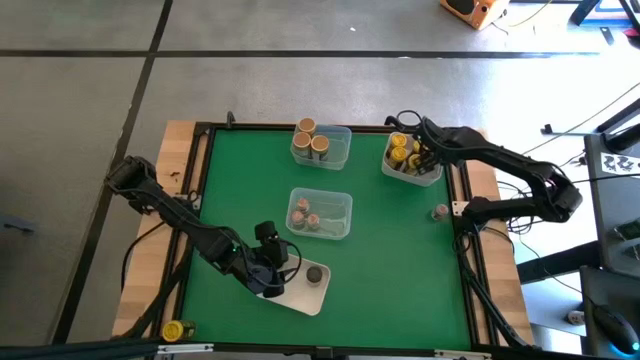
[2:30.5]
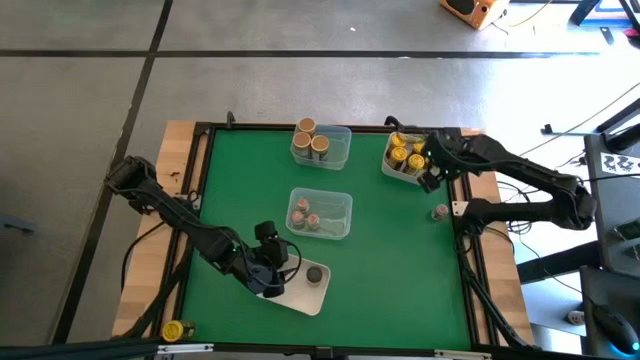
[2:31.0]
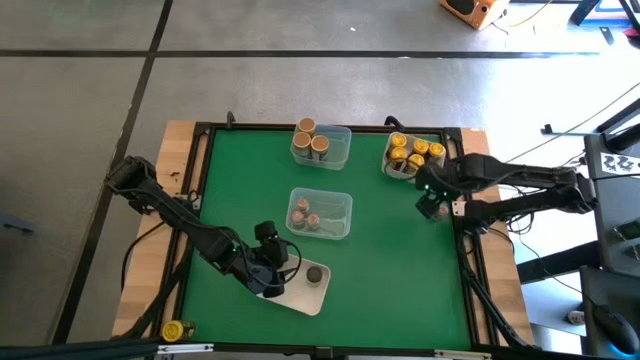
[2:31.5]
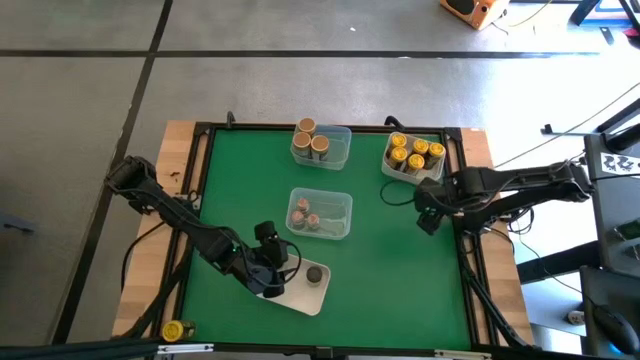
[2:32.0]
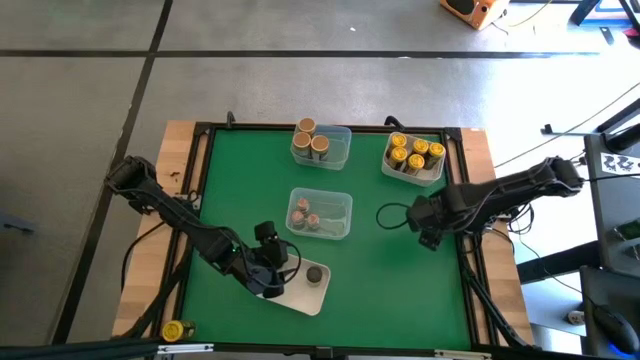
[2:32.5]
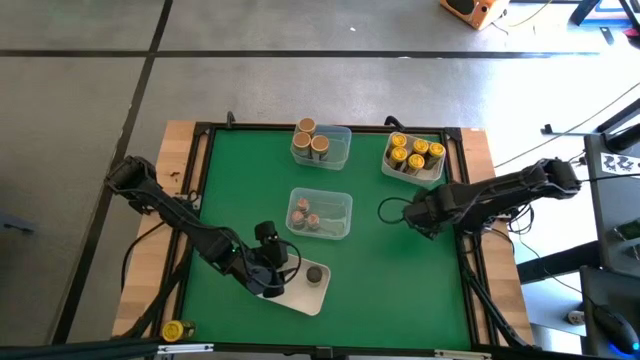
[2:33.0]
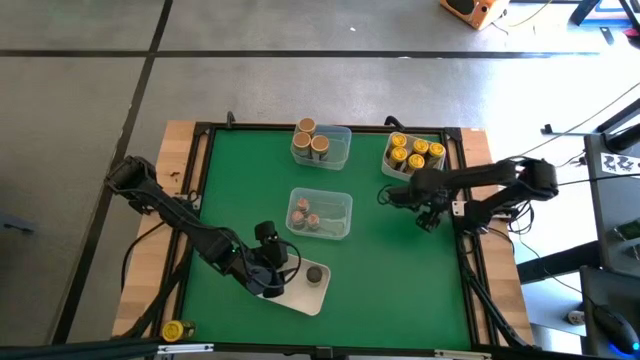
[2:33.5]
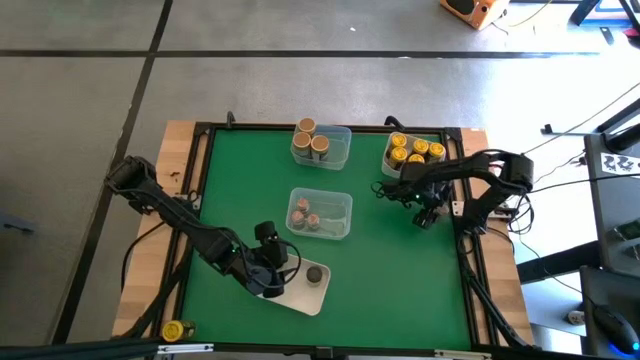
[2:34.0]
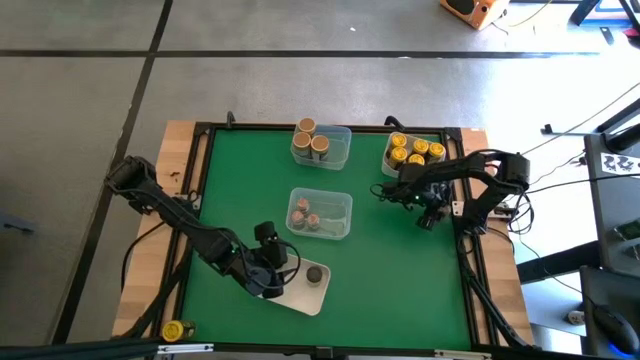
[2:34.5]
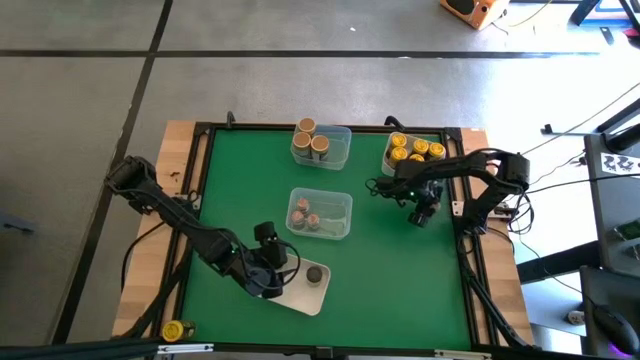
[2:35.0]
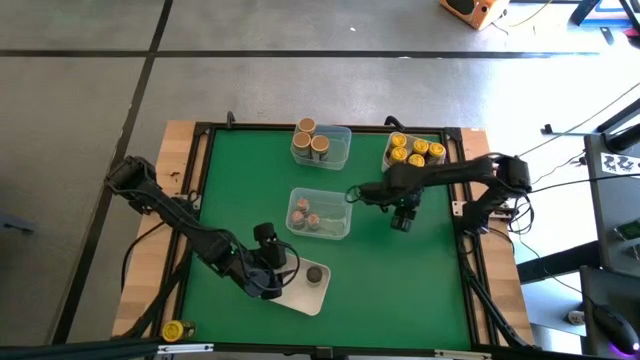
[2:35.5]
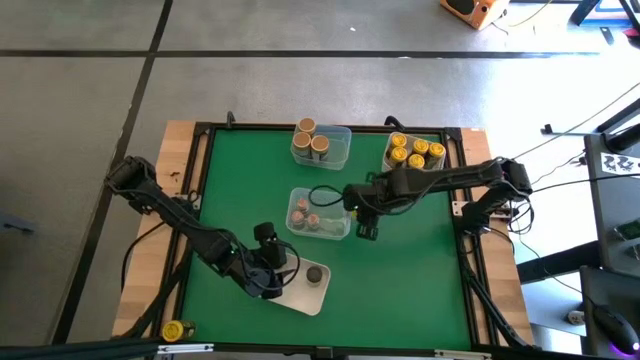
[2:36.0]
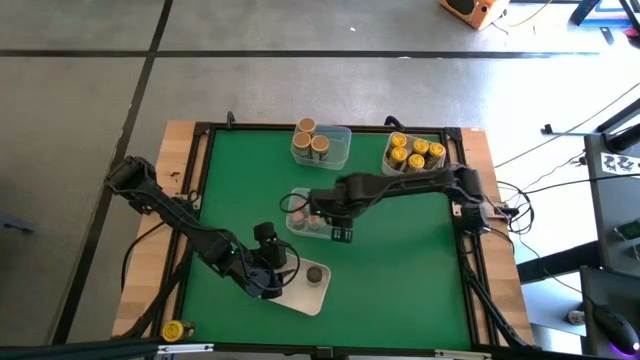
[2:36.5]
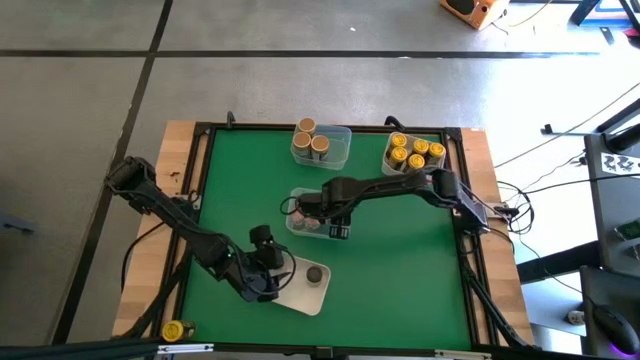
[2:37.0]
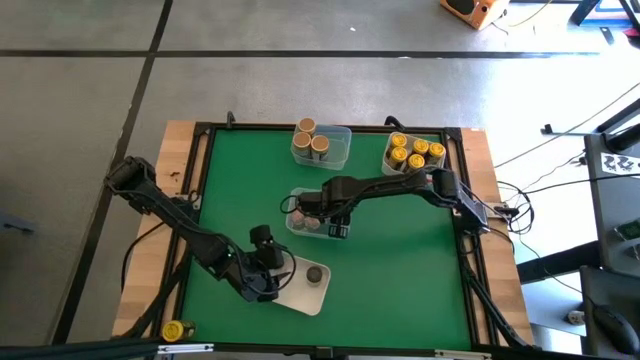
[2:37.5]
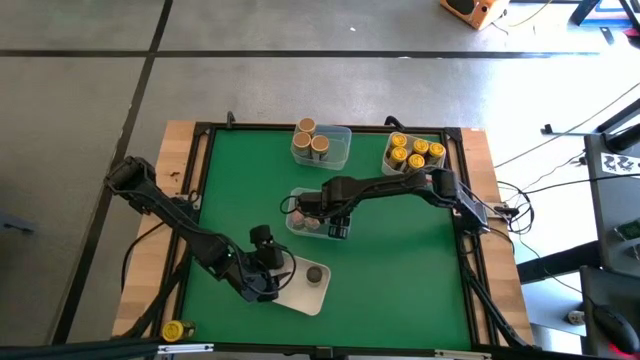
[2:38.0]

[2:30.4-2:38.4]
Task: Sort spices by type
Put the light brown seasoning bottle into the bottom transparent bin

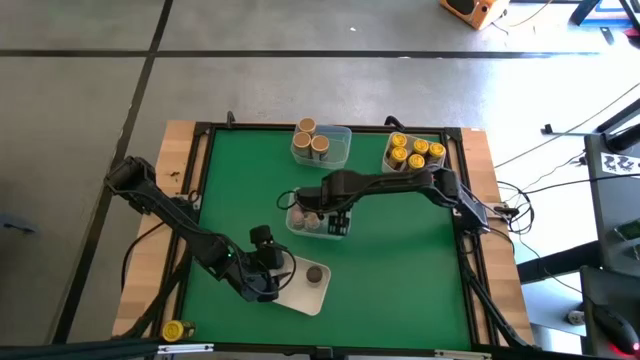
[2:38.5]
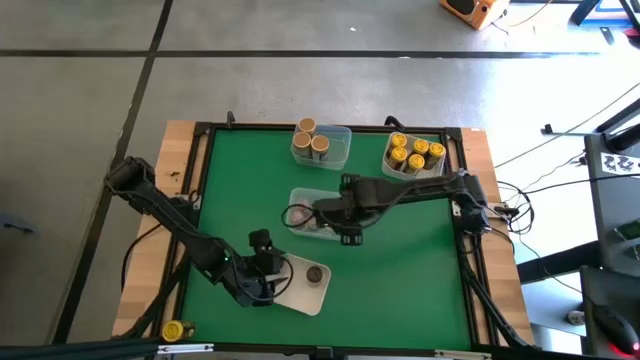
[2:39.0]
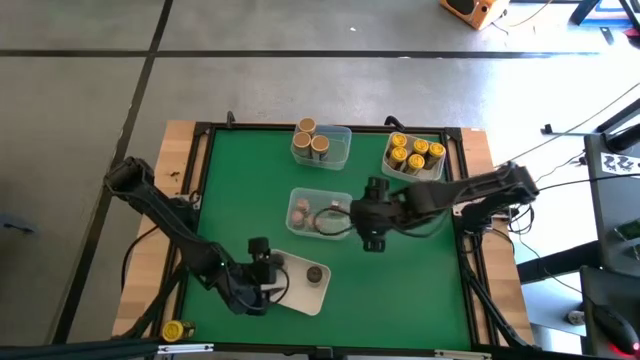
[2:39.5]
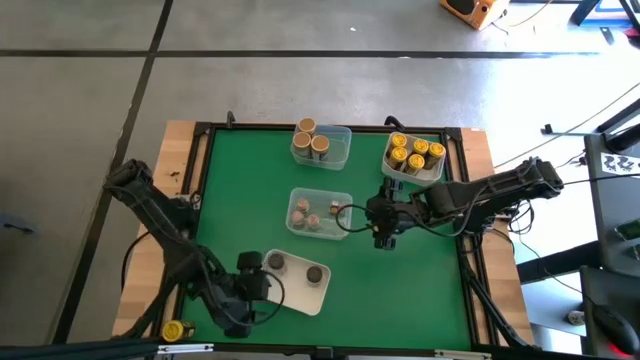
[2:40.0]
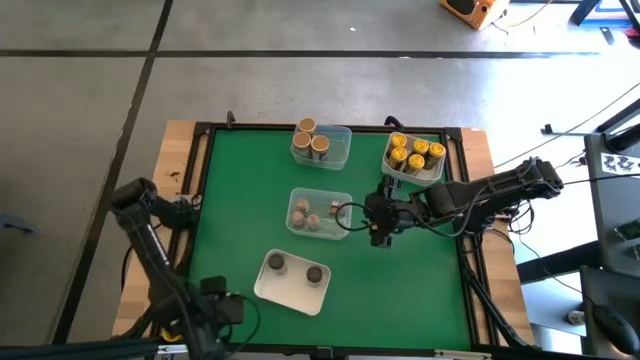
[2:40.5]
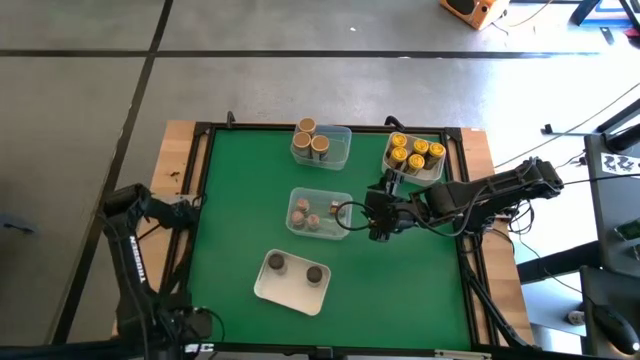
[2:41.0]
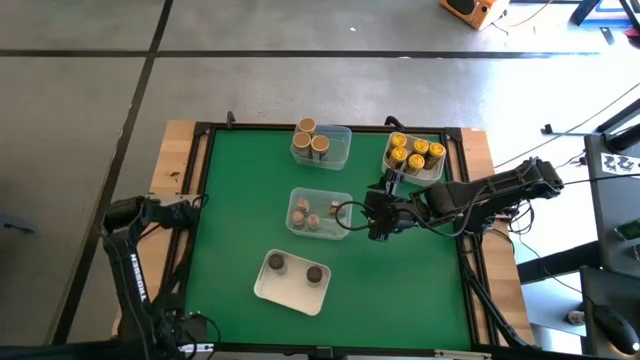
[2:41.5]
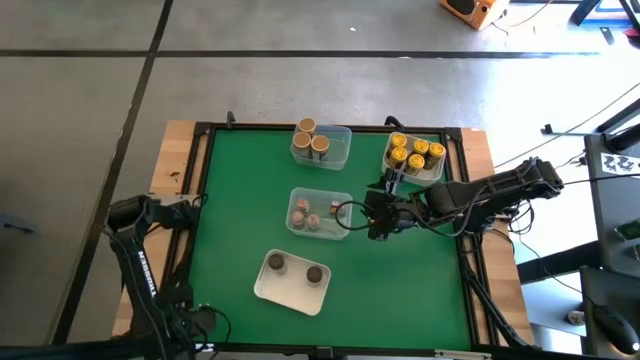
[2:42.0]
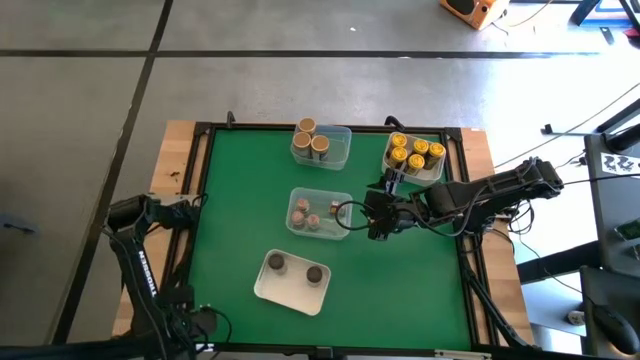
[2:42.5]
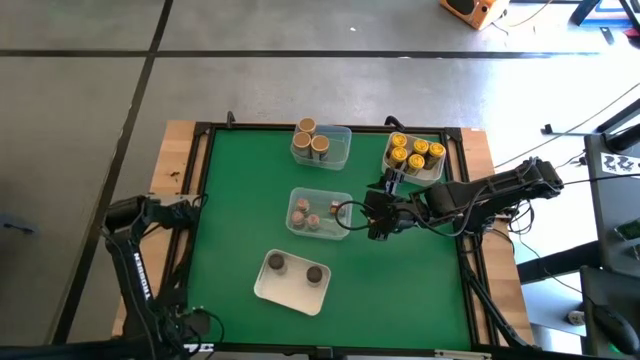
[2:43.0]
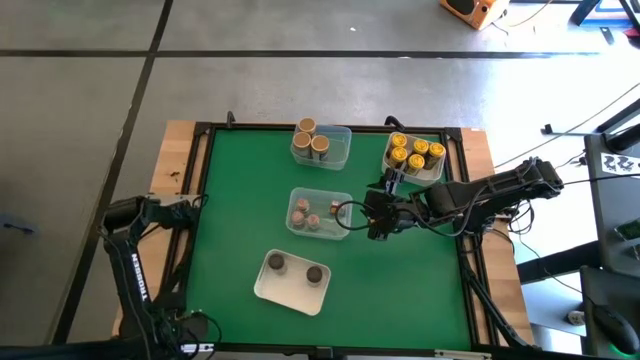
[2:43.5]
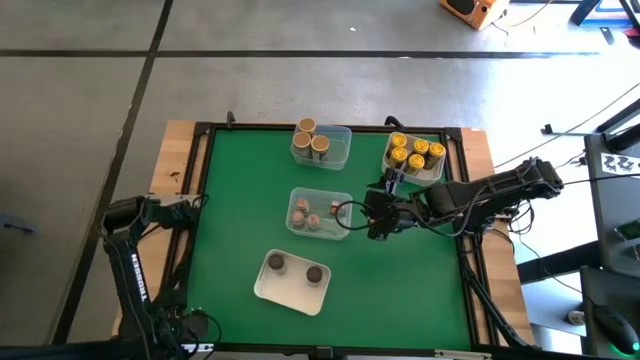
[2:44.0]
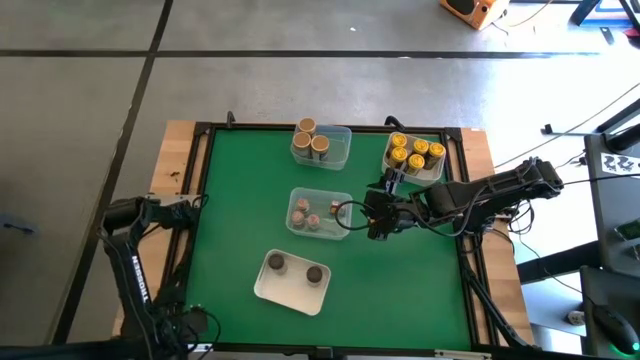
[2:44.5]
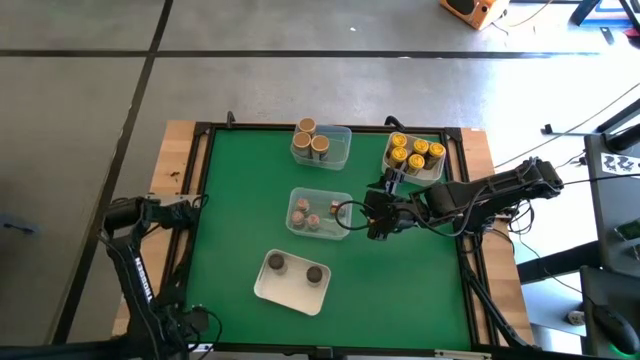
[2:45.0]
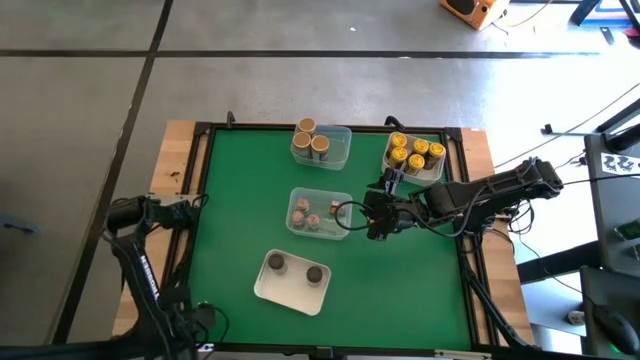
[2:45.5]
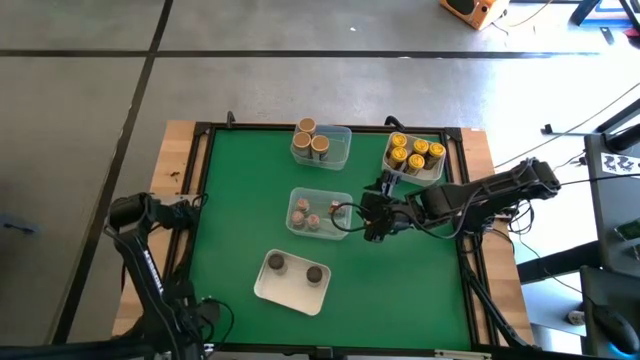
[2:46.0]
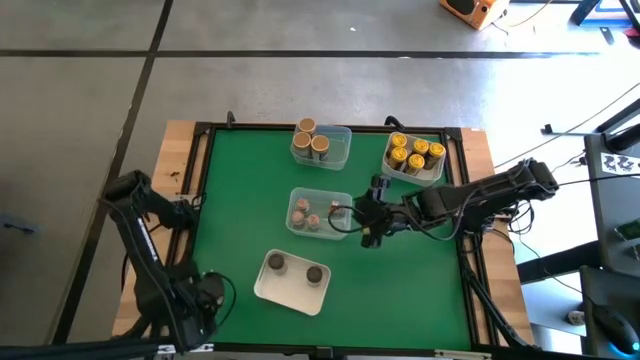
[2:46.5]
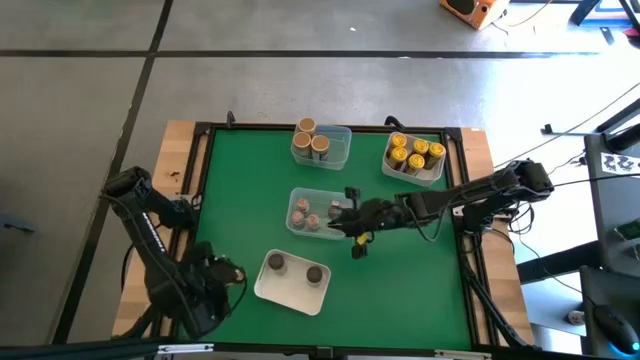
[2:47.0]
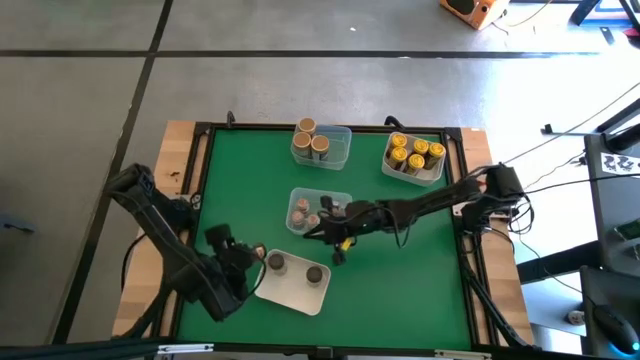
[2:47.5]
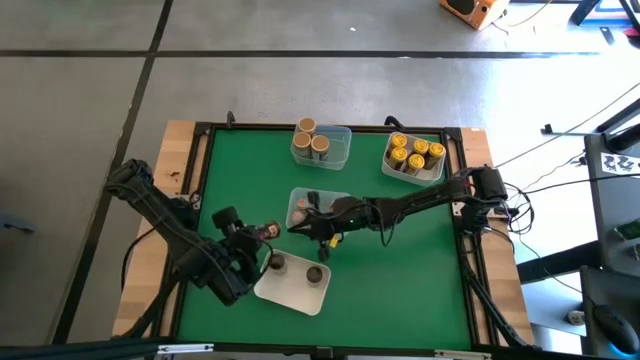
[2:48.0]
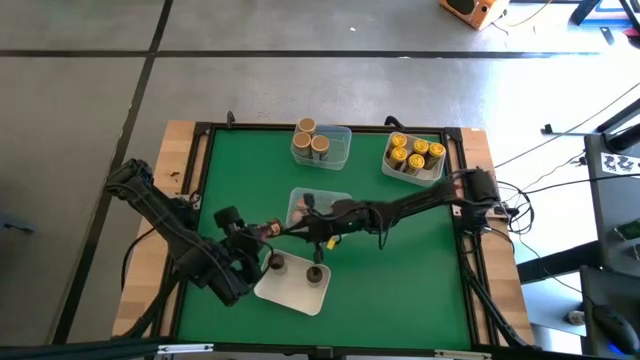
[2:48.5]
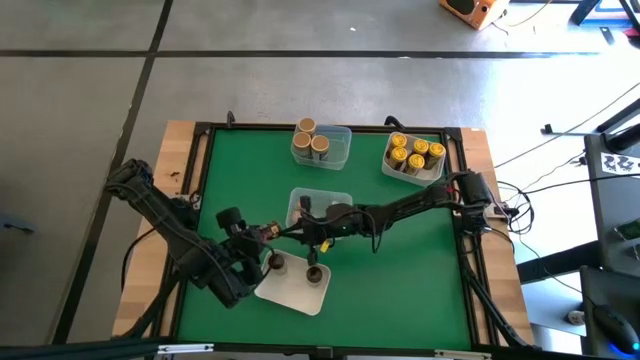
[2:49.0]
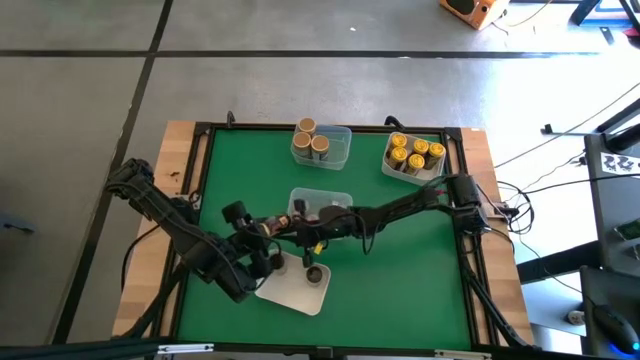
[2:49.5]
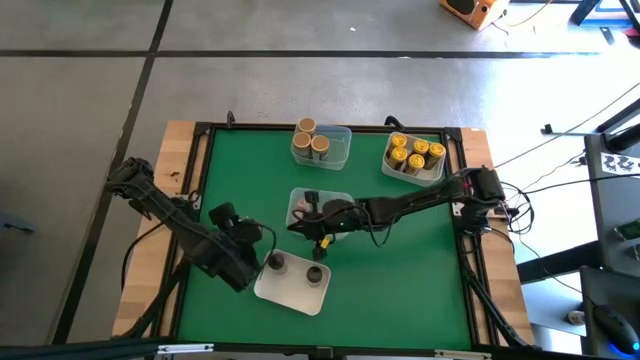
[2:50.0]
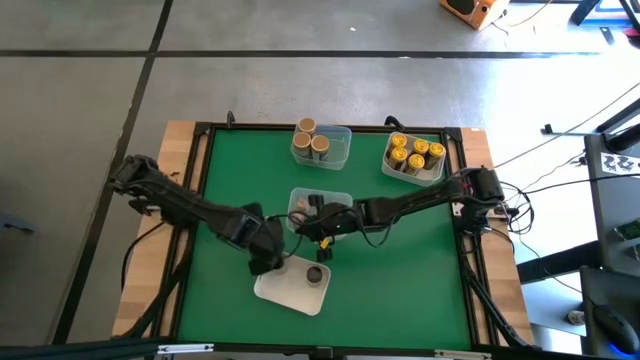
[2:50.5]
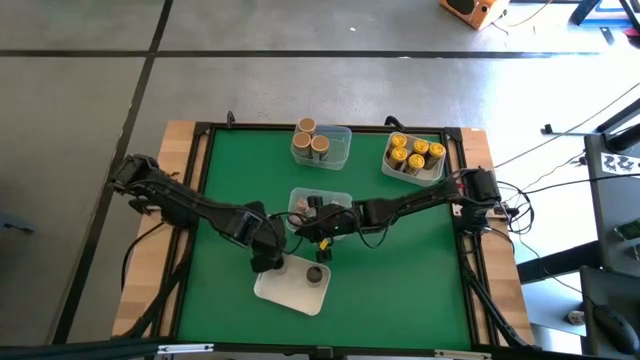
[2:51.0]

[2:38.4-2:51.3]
Put the yellow seasoning bottle into the top white bin
